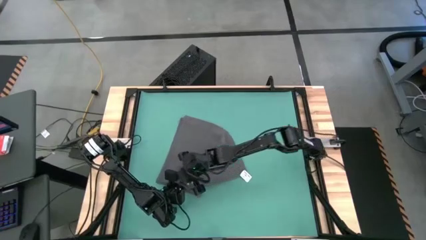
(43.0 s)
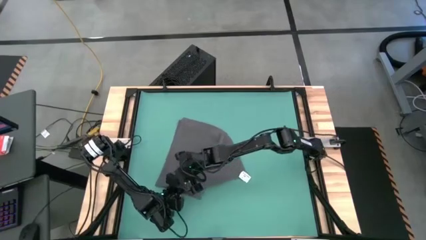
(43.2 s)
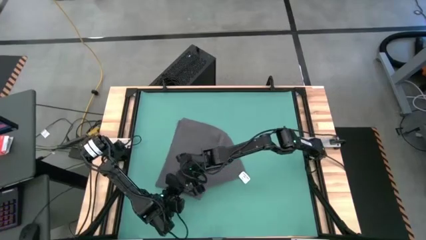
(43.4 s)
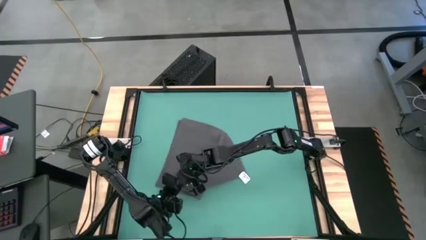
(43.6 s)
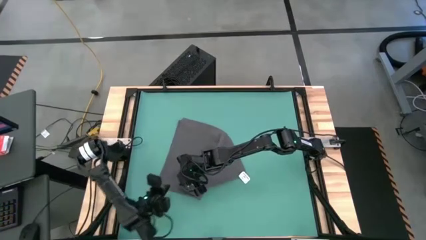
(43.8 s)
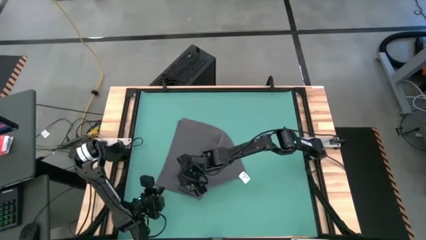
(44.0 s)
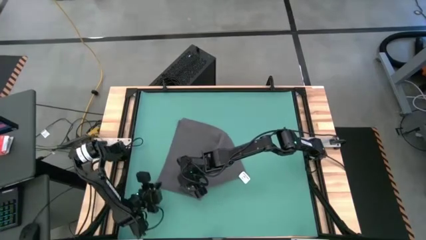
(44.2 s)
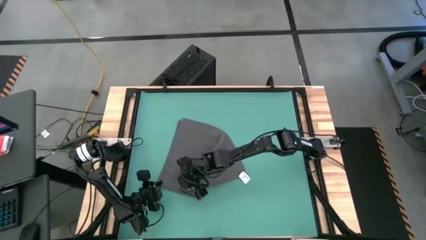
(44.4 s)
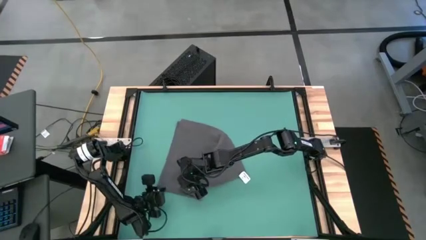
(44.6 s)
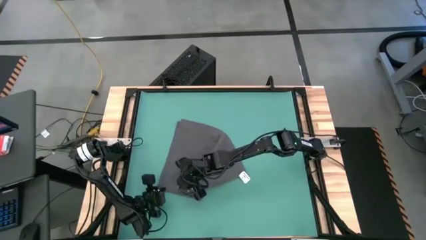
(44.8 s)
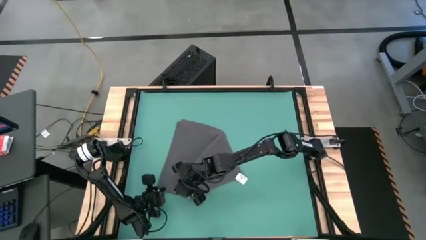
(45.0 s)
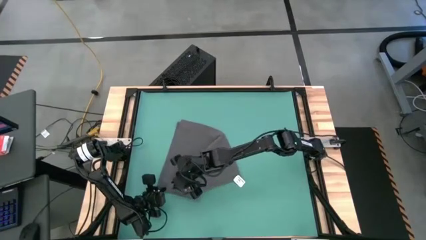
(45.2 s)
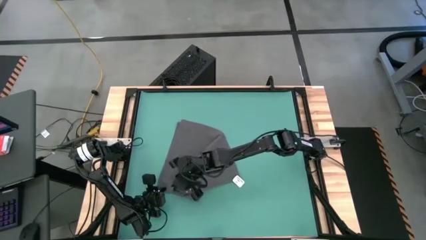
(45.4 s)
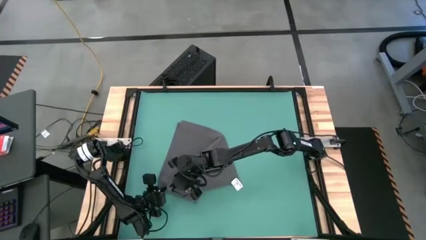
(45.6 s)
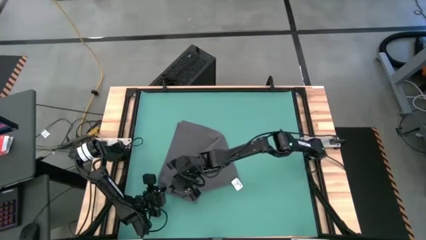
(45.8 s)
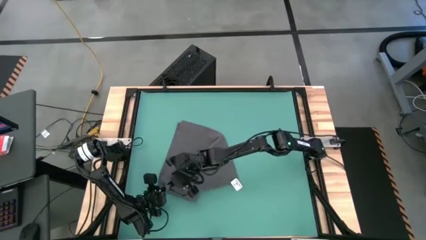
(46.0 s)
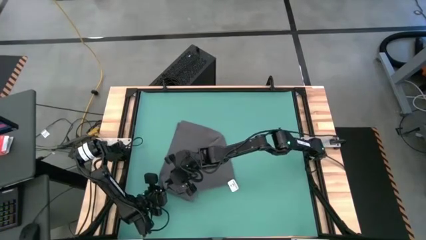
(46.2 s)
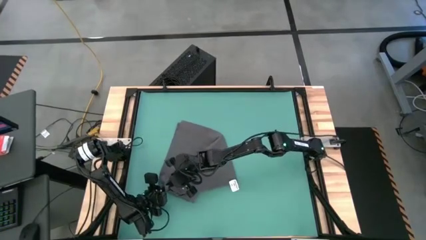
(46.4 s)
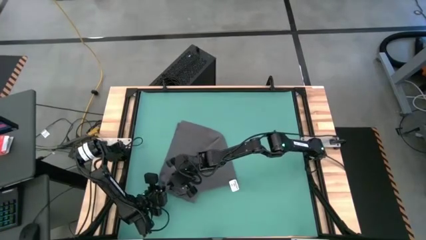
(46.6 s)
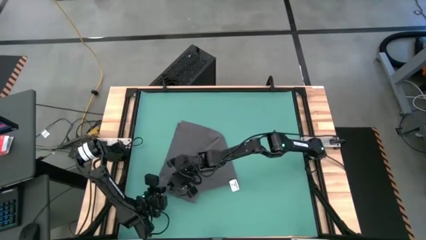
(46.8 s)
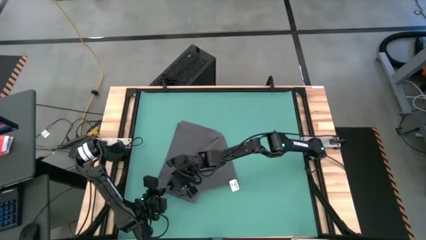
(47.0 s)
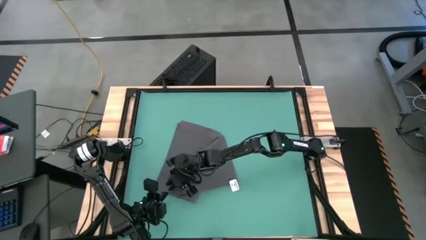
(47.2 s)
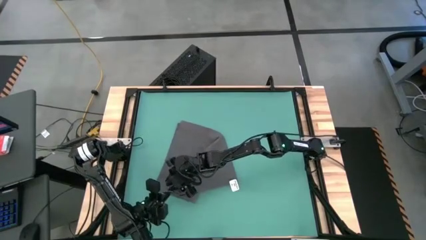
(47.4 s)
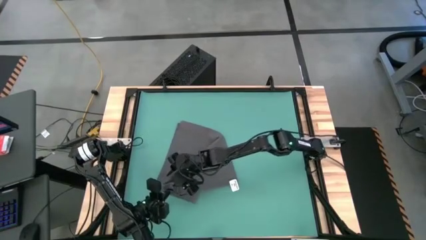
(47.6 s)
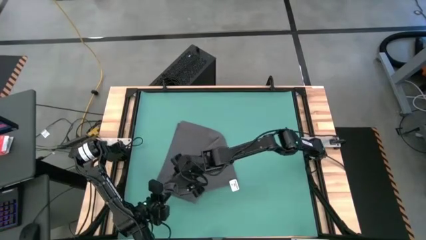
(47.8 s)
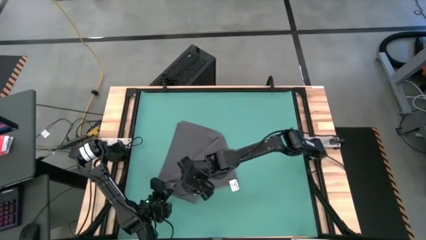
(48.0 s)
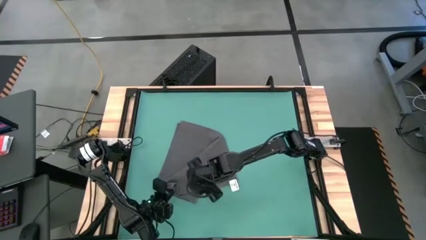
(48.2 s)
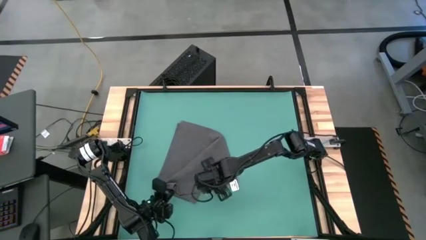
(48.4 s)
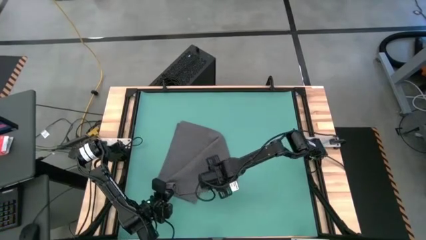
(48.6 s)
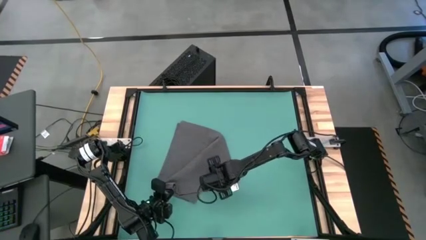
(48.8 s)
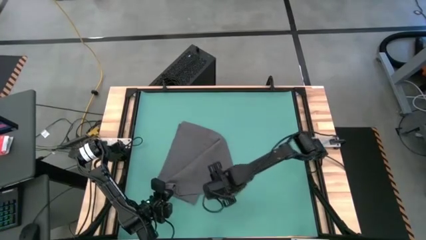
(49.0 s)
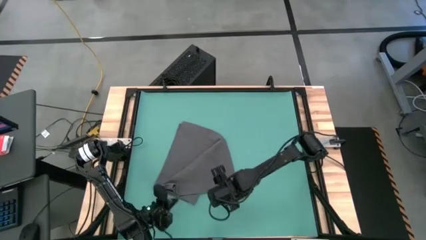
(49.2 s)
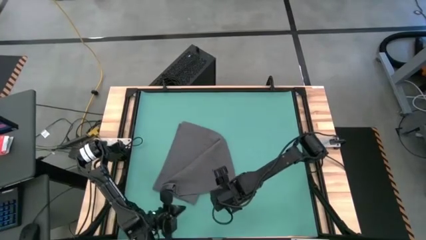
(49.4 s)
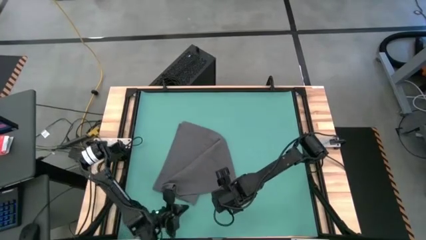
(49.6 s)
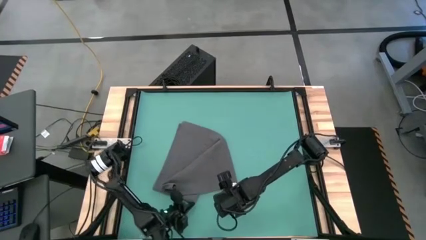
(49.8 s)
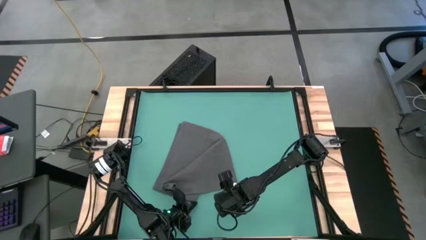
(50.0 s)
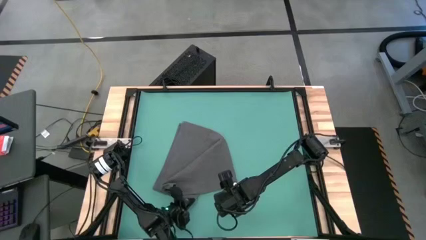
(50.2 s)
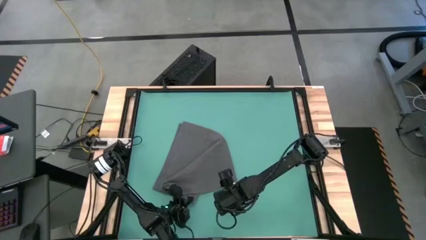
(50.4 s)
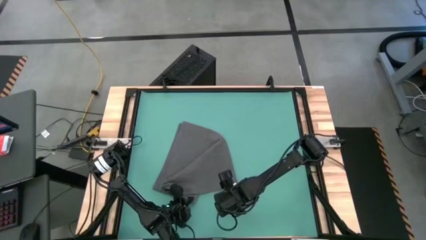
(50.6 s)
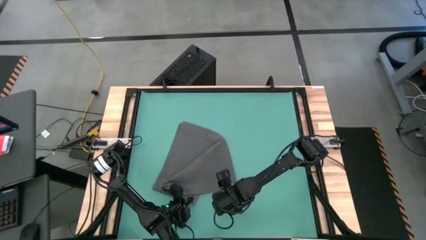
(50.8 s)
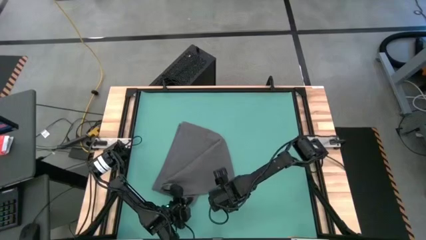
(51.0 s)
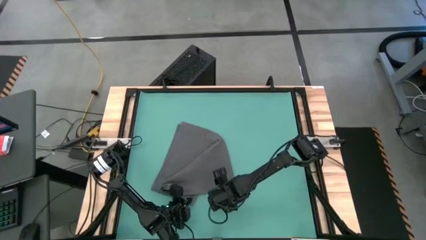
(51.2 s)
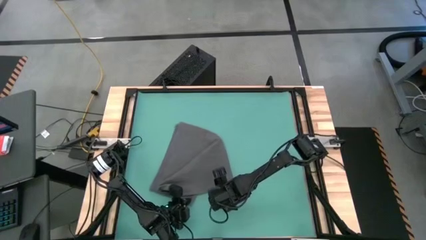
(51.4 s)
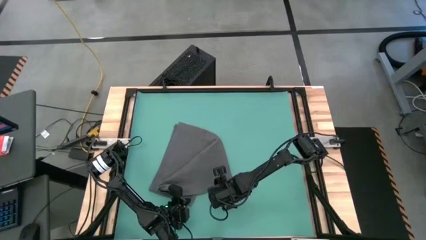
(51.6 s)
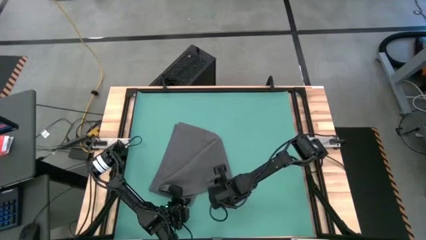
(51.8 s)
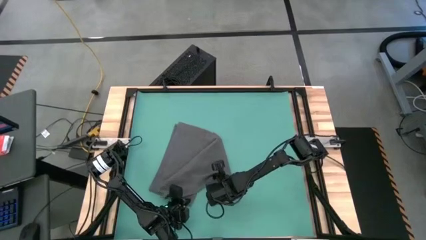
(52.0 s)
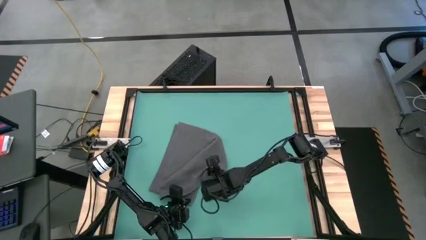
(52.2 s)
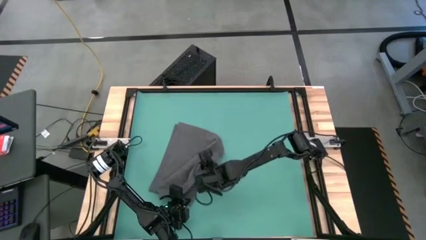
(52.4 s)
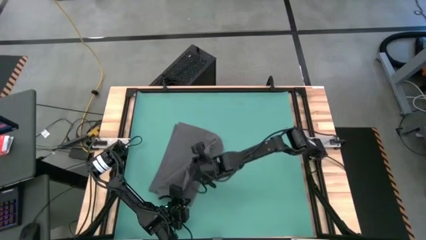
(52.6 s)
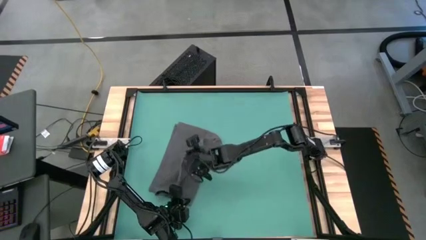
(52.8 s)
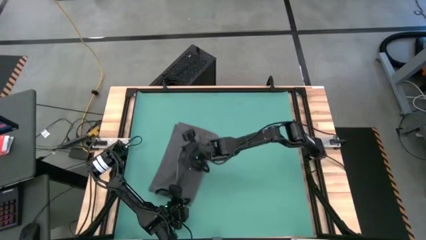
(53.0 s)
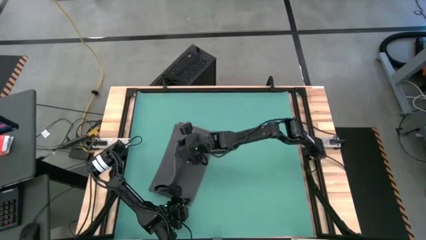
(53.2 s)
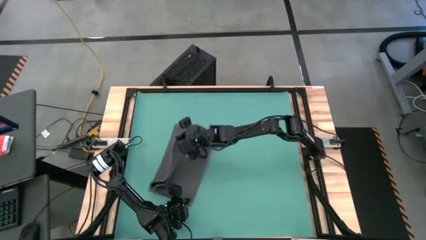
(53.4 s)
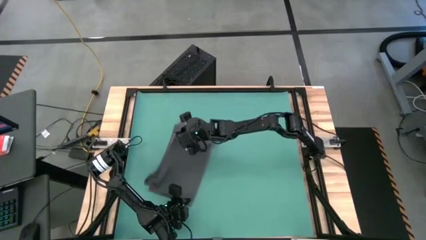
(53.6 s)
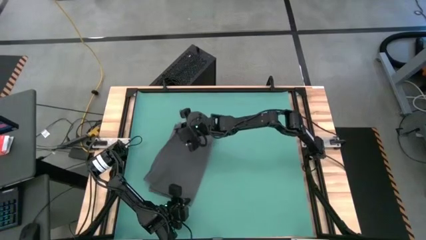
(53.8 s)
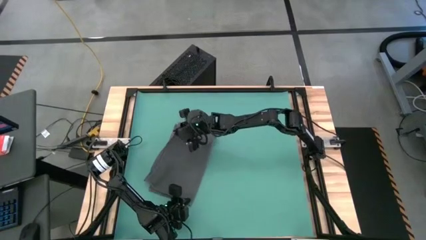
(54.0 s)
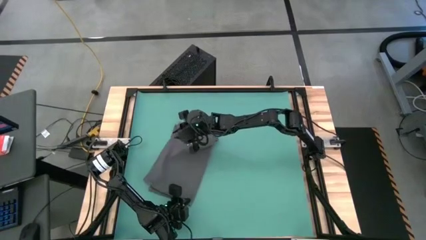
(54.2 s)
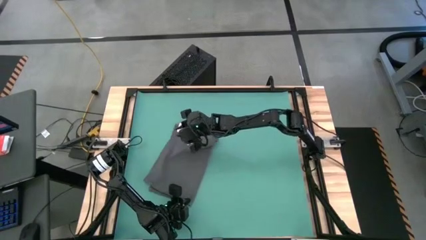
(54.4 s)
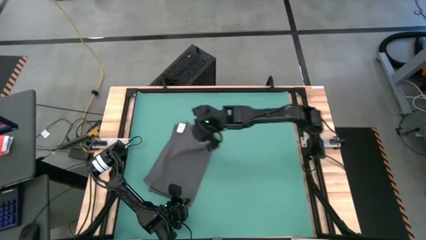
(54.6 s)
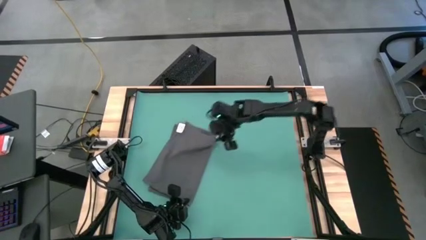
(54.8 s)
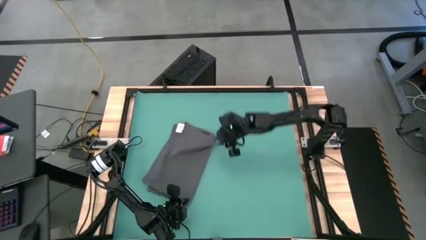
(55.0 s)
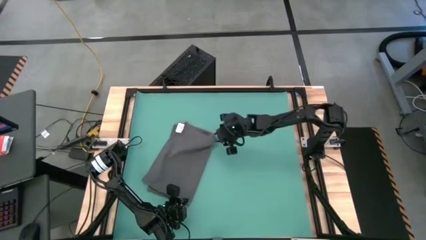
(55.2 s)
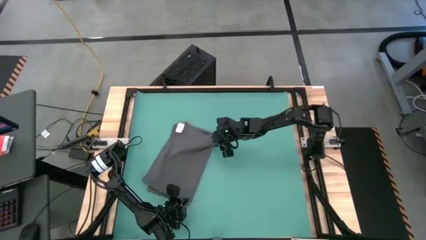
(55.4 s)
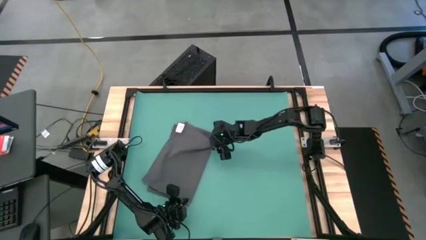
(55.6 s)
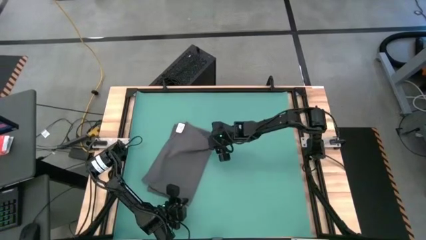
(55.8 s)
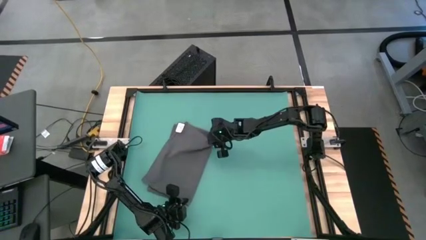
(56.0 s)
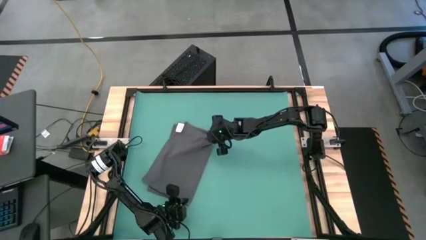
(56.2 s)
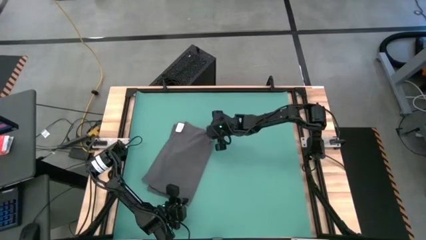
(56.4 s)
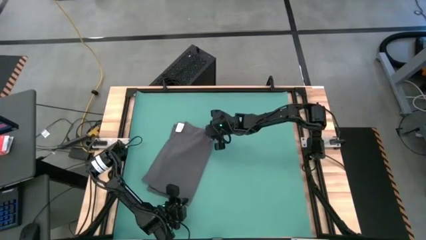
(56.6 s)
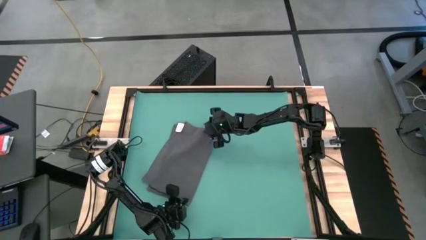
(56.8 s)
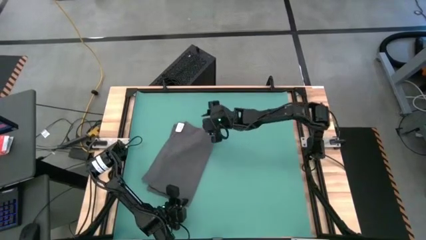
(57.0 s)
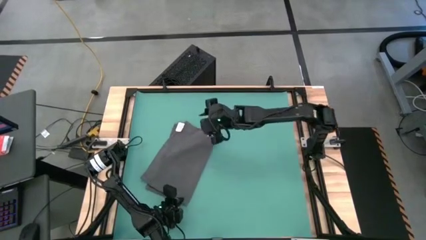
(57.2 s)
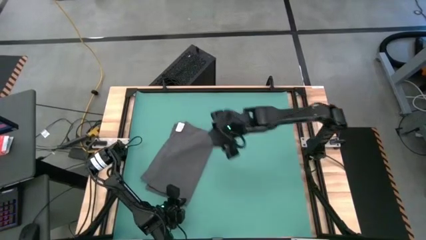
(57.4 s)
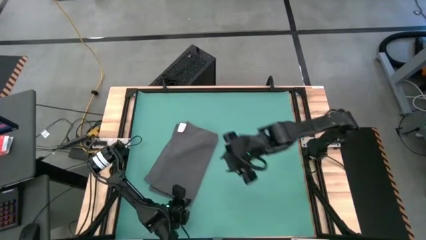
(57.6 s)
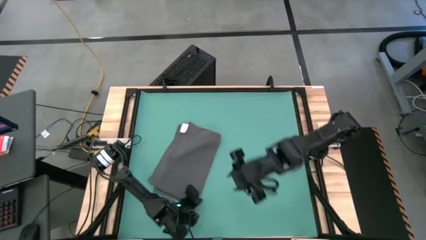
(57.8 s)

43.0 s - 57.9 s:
Task: Roll towel
Fold the gray towel

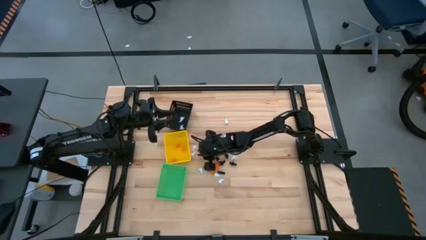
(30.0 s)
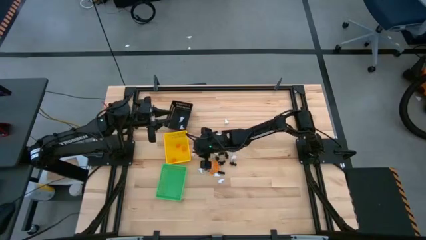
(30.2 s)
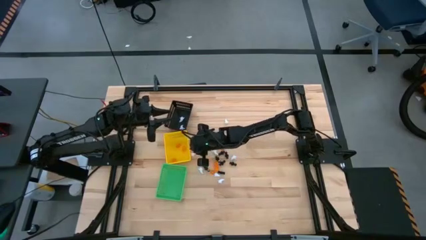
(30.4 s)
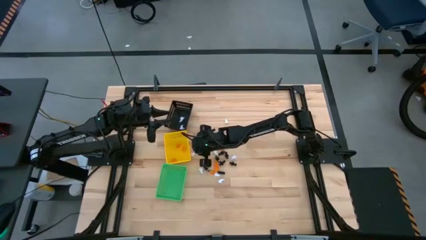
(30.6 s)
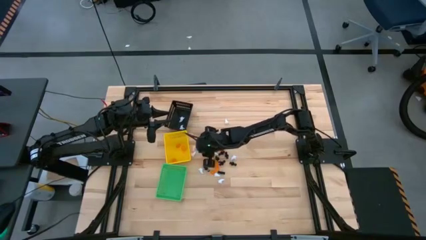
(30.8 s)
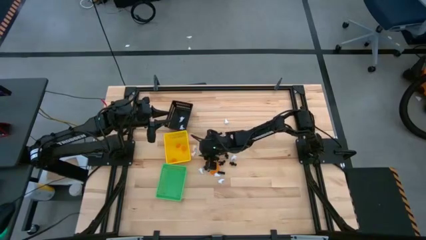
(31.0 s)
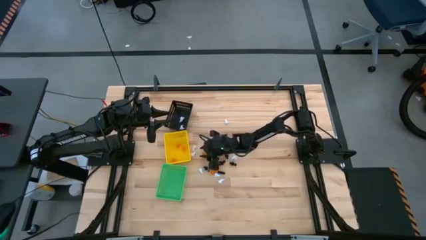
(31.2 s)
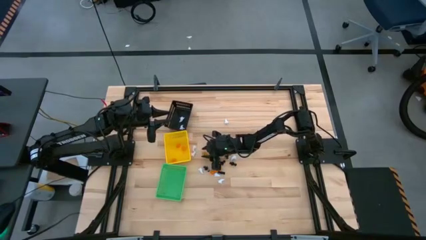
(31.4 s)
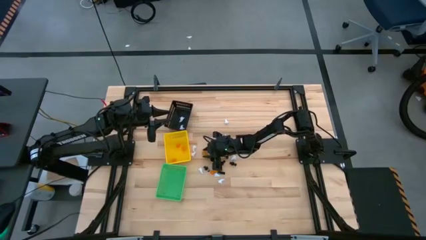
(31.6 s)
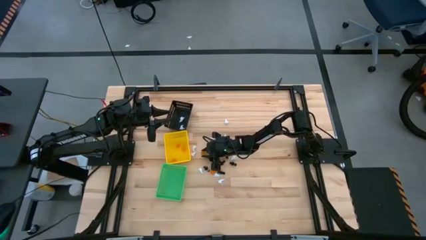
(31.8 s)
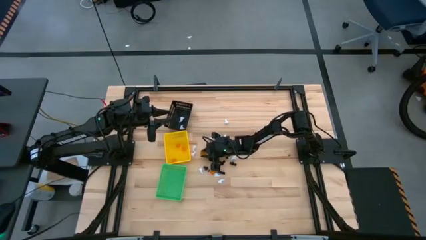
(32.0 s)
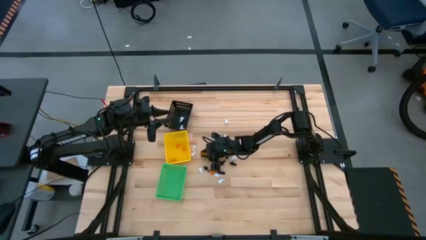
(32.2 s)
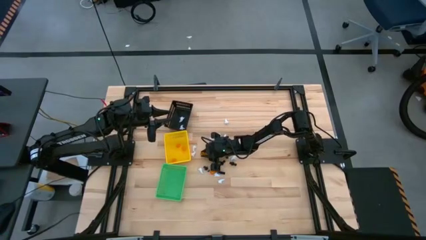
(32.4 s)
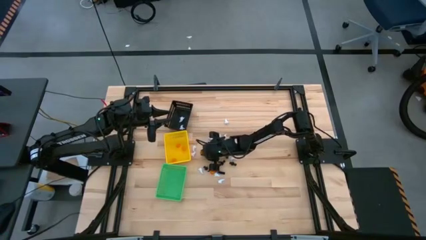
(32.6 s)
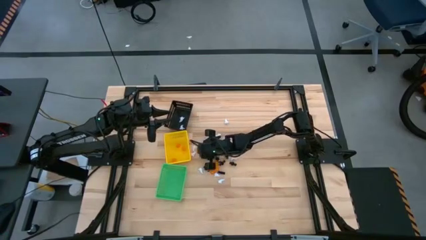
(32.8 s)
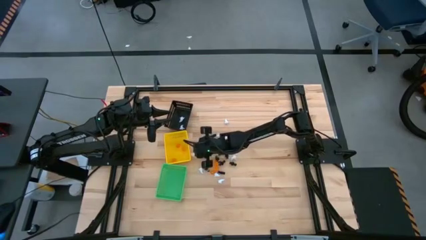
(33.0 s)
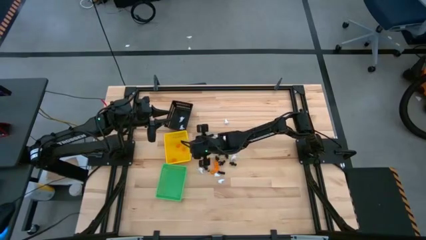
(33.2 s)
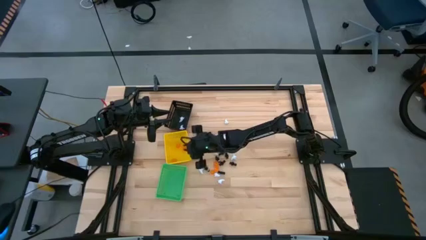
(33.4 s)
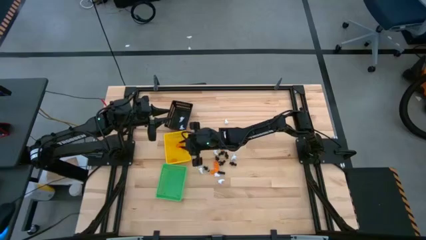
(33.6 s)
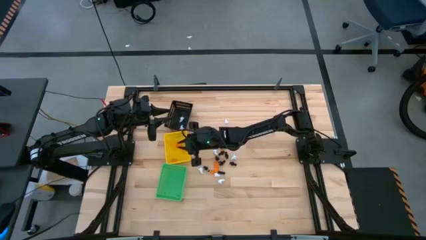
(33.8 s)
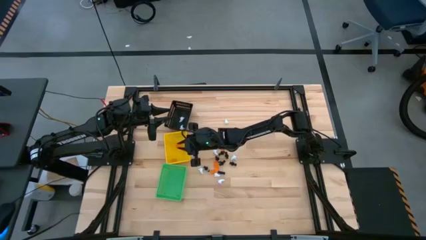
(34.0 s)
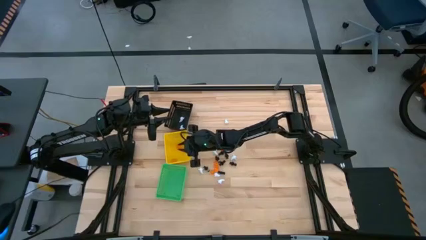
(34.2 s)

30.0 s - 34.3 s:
Task: Sort Halloween decoration
Put the orange pumpkin toy into the yellow basket
